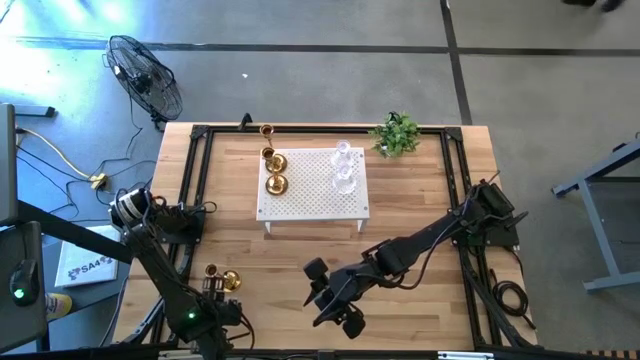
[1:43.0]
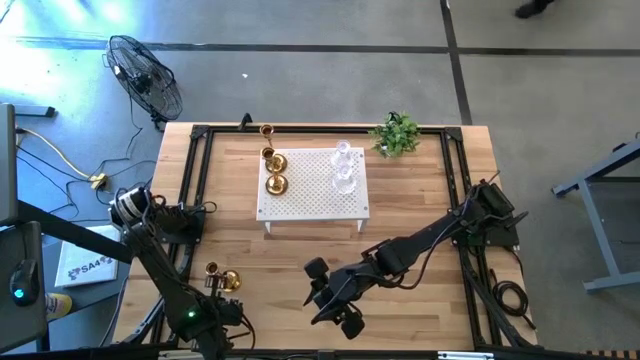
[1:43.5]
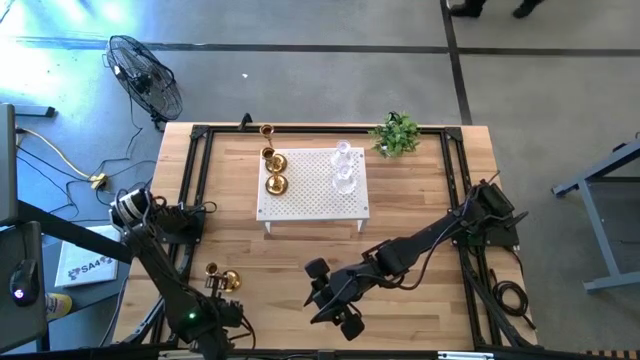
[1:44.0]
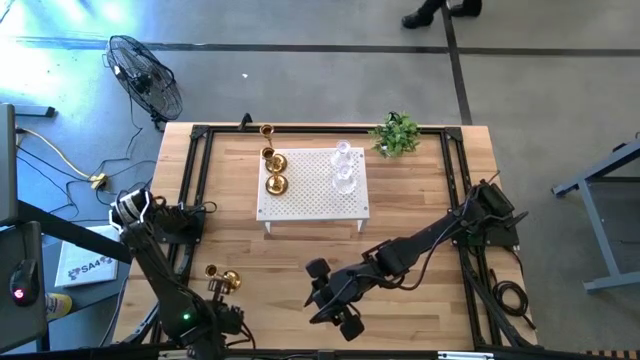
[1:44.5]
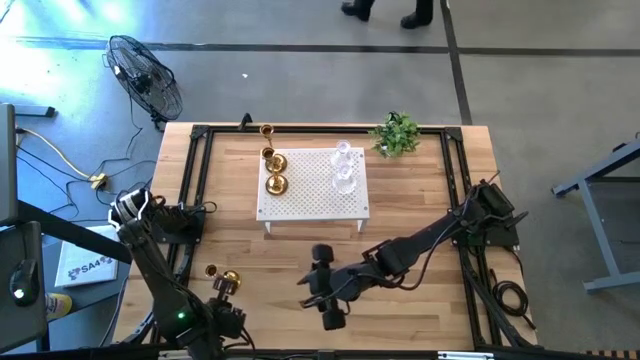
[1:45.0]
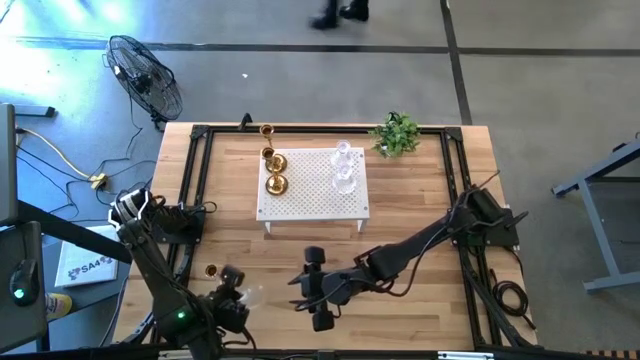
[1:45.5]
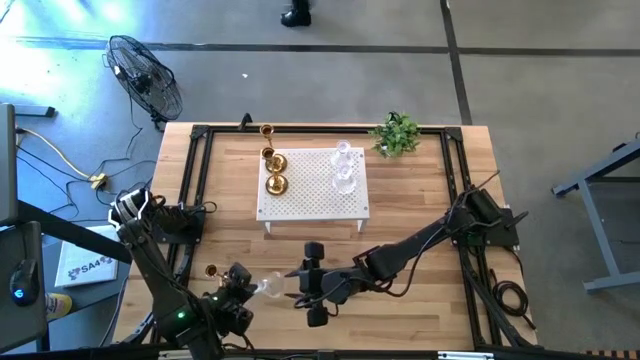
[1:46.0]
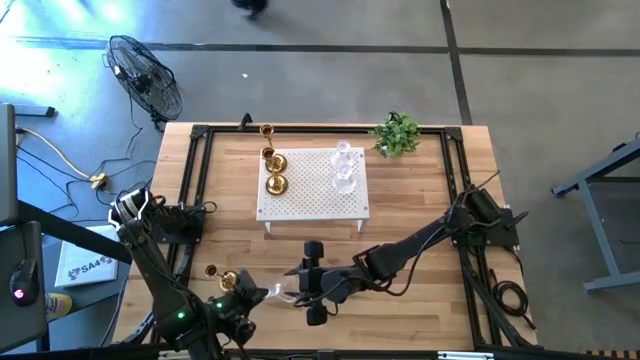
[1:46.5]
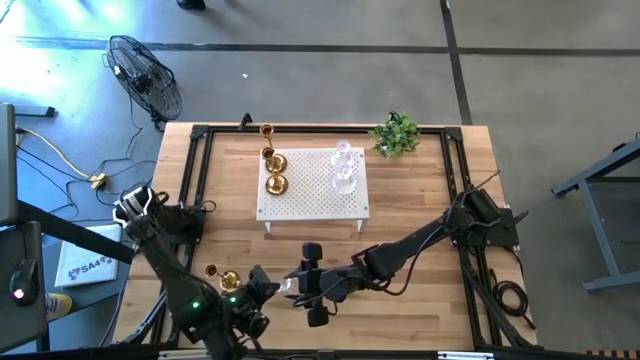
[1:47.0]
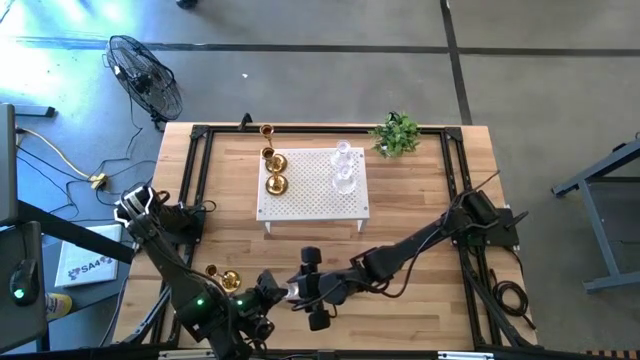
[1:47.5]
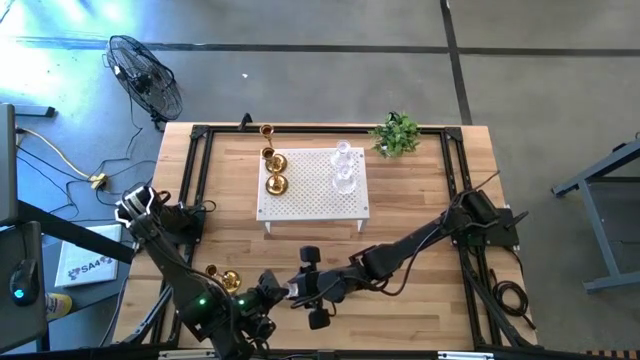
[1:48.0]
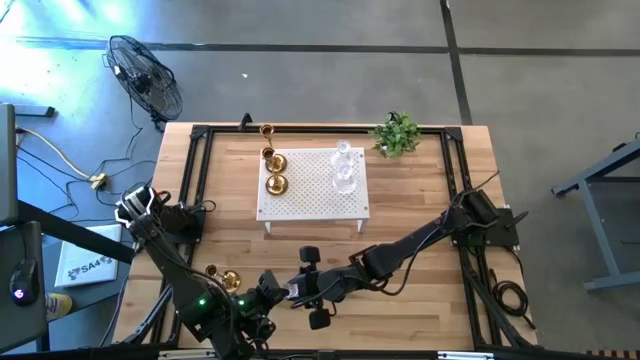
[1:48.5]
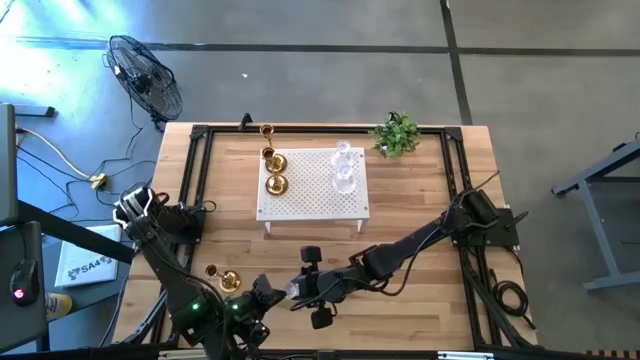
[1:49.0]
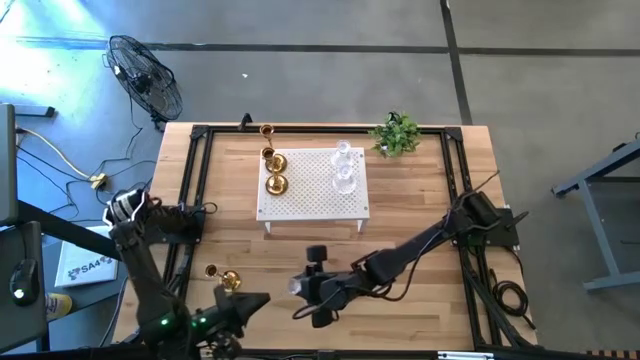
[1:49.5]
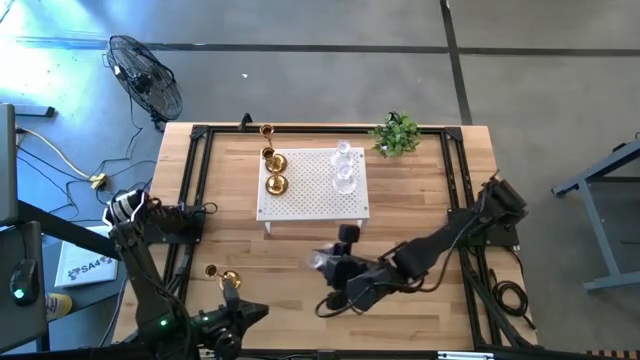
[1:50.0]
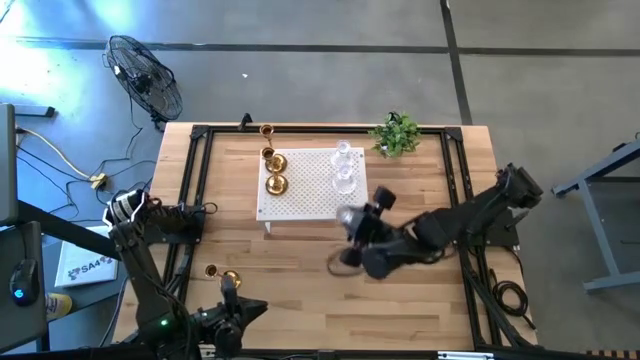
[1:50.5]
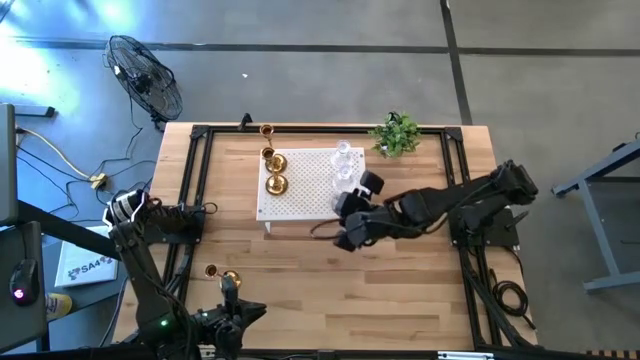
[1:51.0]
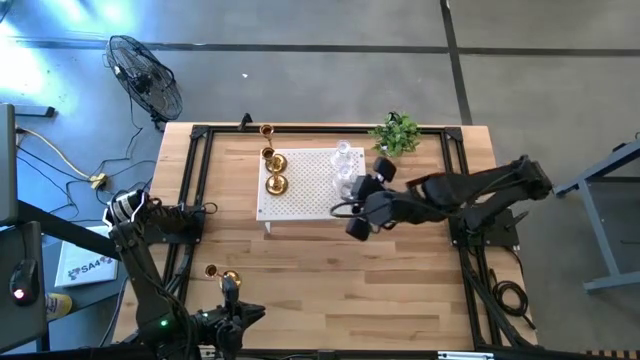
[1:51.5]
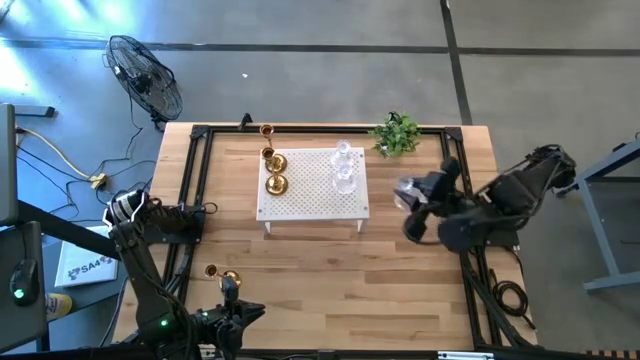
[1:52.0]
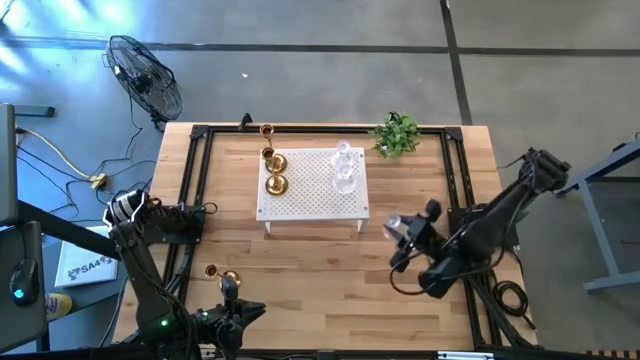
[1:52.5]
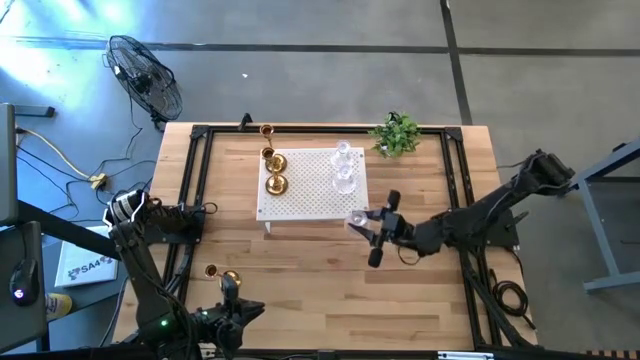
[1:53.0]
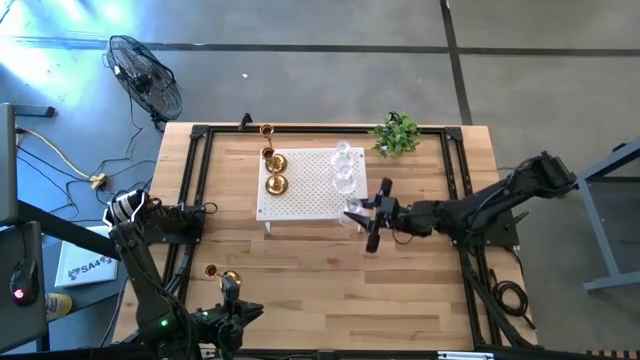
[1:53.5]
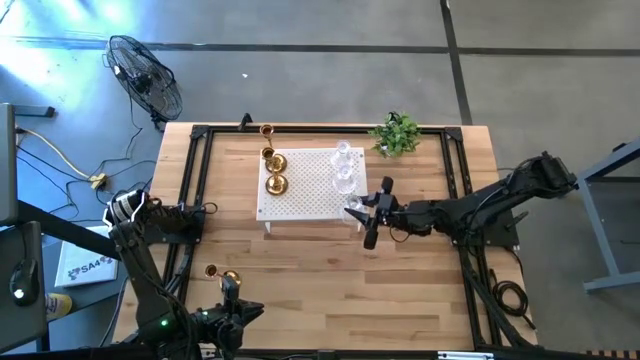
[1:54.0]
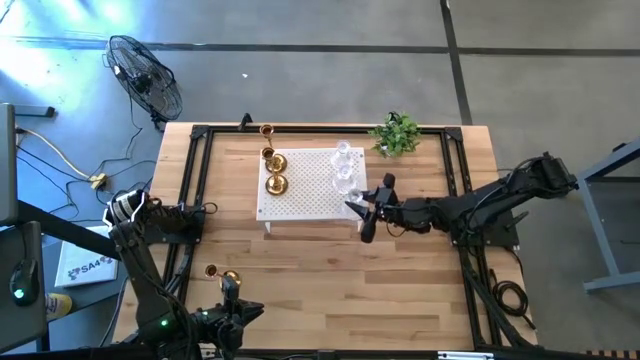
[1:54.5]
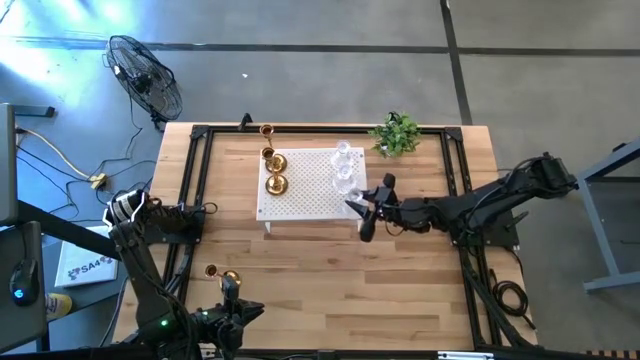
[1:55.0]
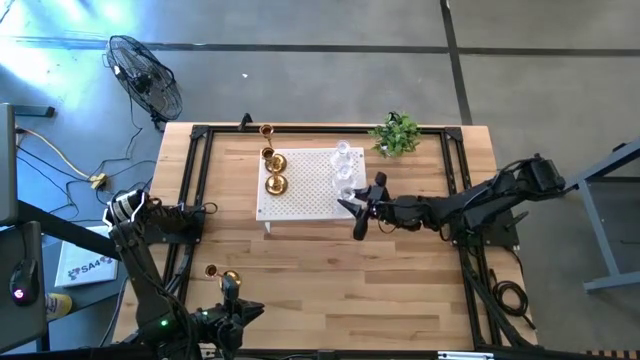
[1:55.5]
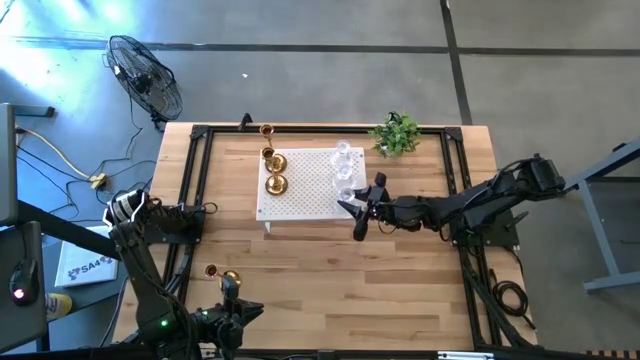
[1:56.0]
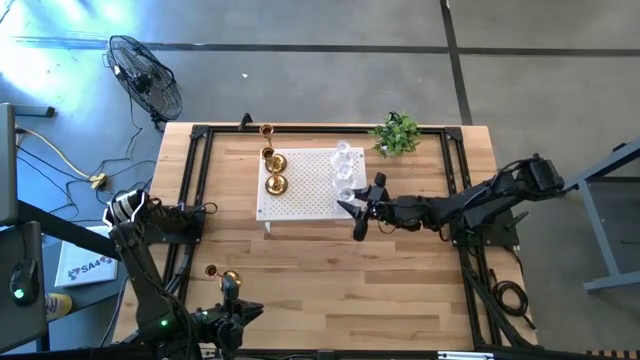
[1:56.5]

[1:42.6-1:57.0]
Task: Pick & Place candle stick holders
Put the transparent glass candle holder on the shelf aligned with the other transparent glass candle holders
